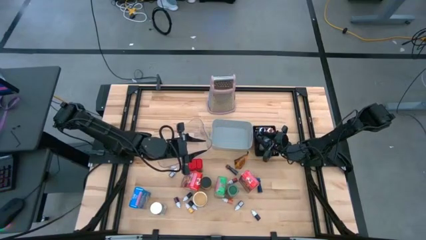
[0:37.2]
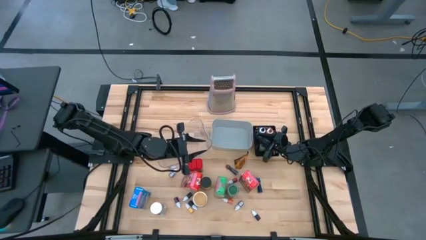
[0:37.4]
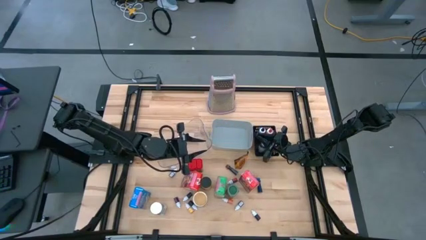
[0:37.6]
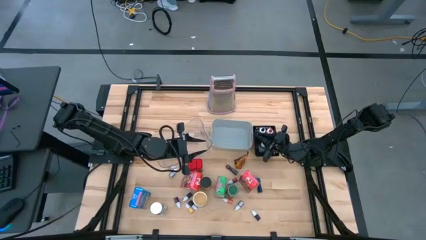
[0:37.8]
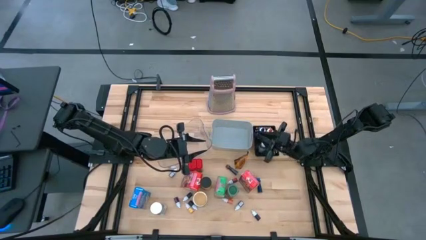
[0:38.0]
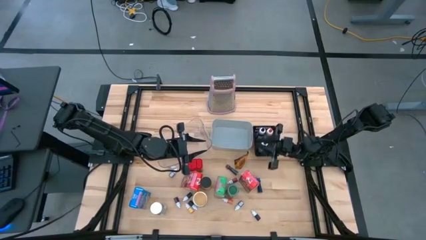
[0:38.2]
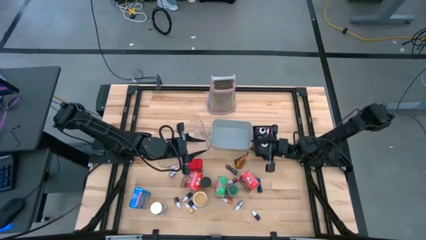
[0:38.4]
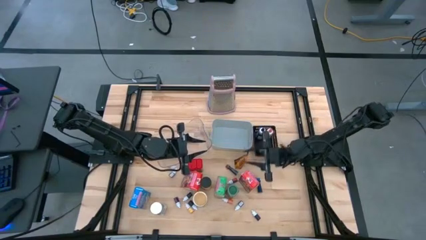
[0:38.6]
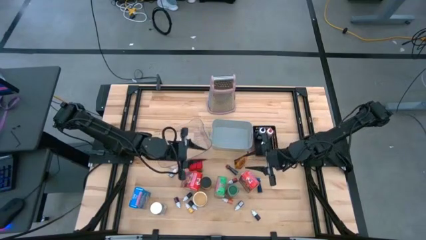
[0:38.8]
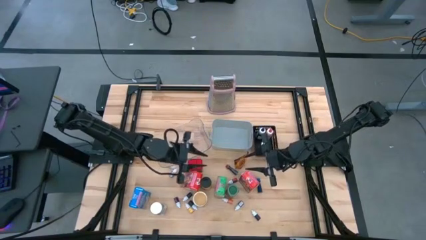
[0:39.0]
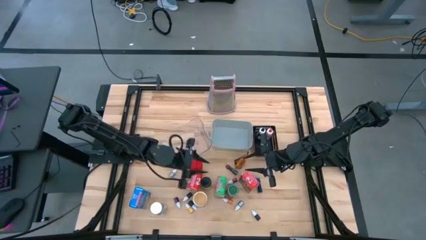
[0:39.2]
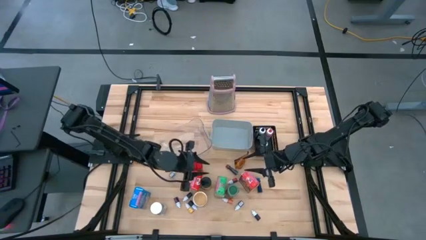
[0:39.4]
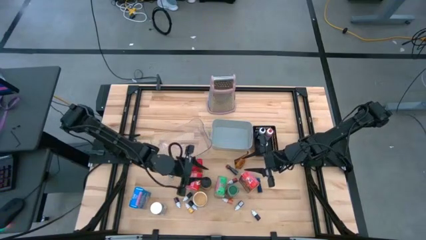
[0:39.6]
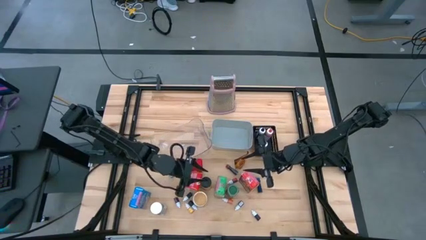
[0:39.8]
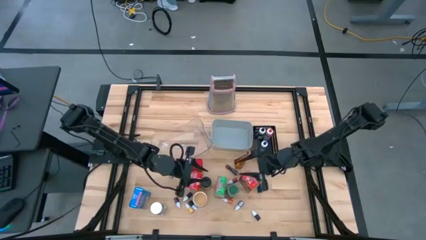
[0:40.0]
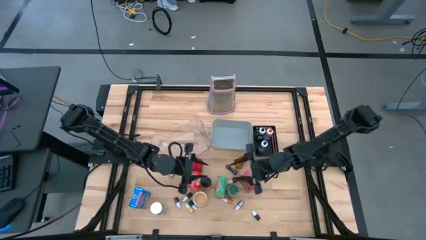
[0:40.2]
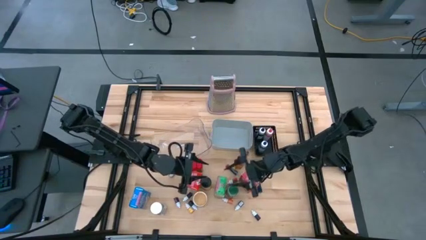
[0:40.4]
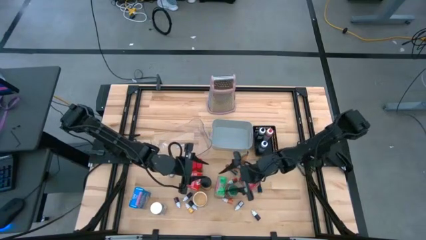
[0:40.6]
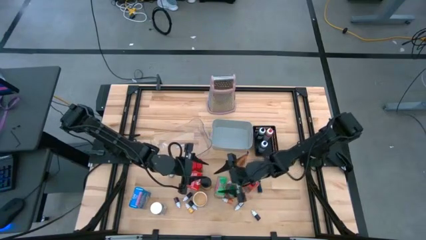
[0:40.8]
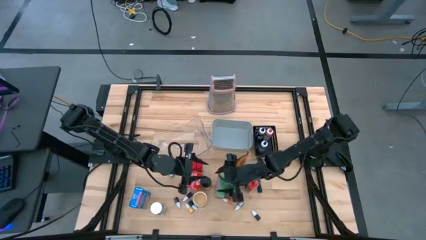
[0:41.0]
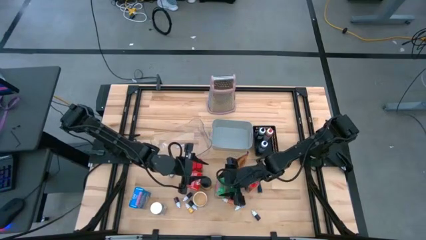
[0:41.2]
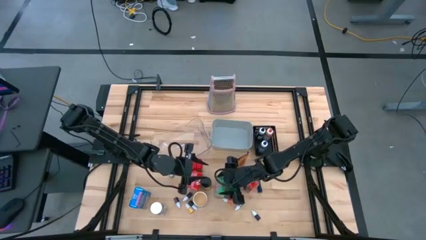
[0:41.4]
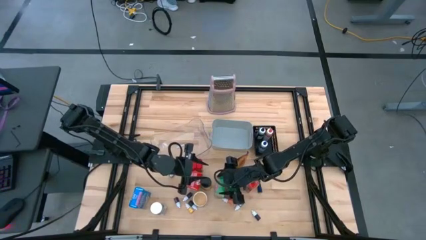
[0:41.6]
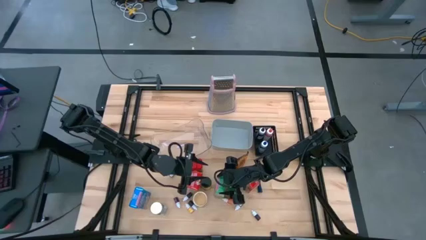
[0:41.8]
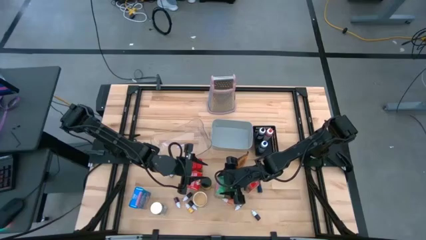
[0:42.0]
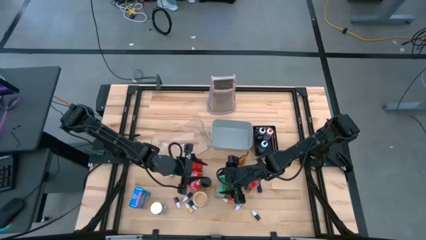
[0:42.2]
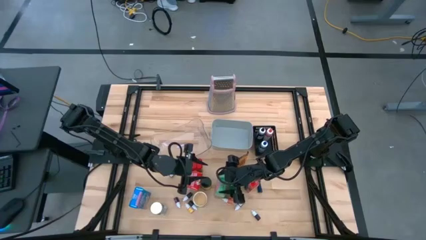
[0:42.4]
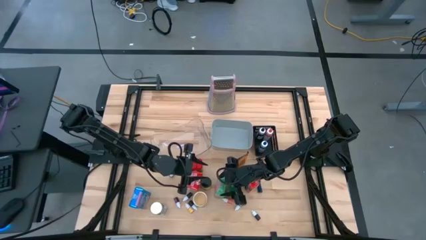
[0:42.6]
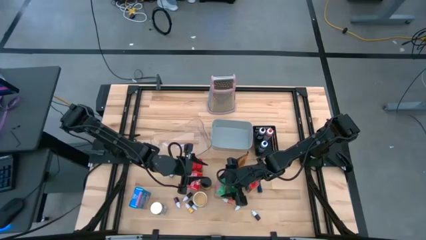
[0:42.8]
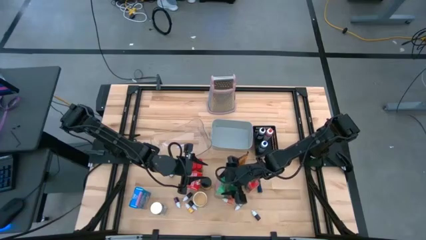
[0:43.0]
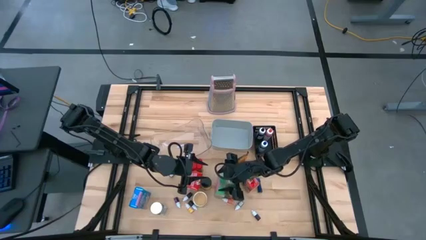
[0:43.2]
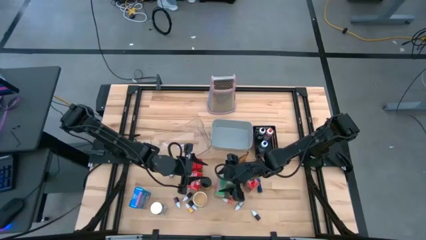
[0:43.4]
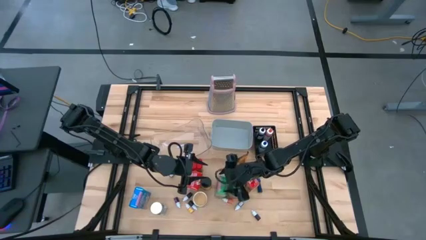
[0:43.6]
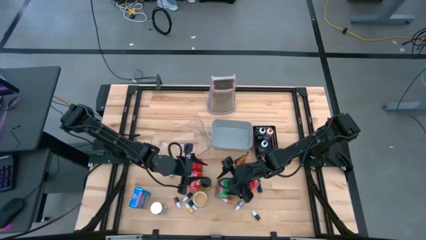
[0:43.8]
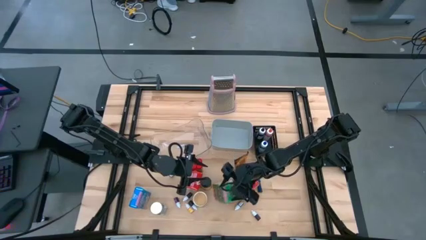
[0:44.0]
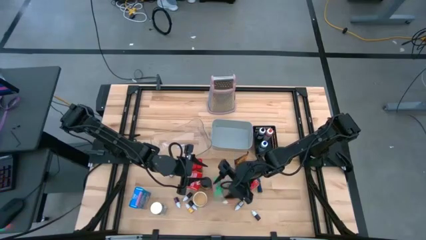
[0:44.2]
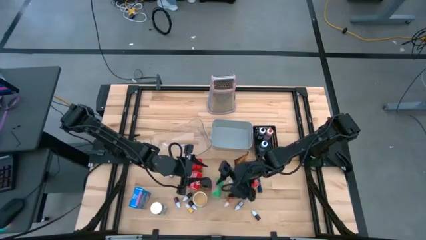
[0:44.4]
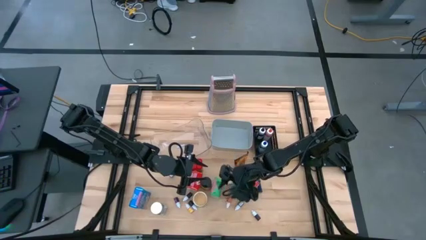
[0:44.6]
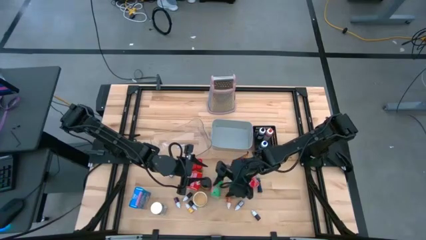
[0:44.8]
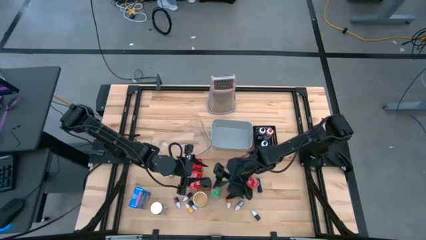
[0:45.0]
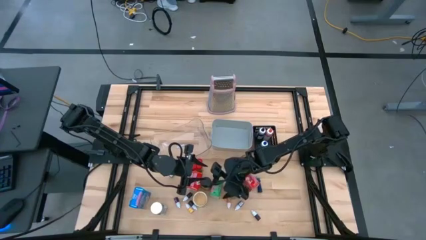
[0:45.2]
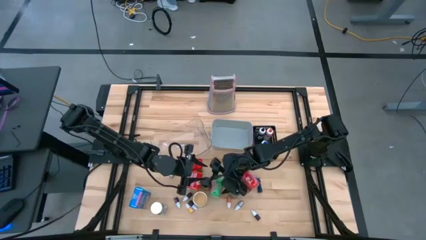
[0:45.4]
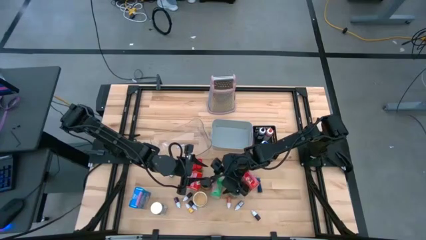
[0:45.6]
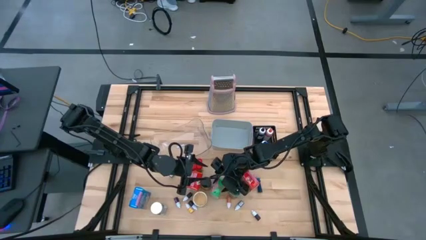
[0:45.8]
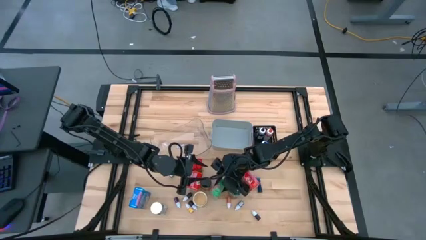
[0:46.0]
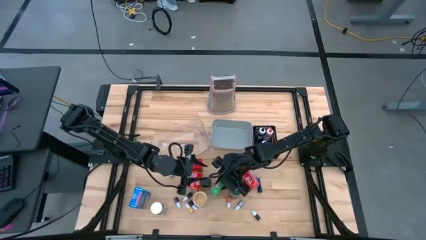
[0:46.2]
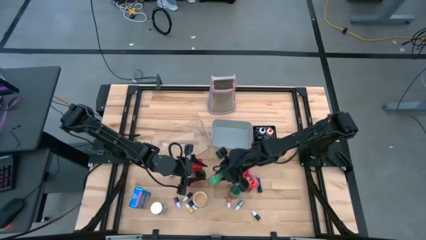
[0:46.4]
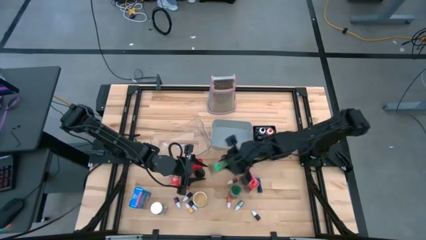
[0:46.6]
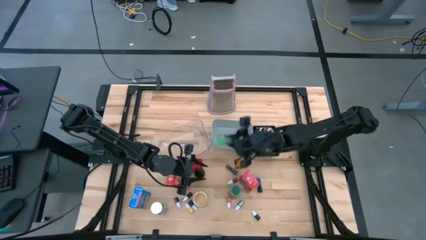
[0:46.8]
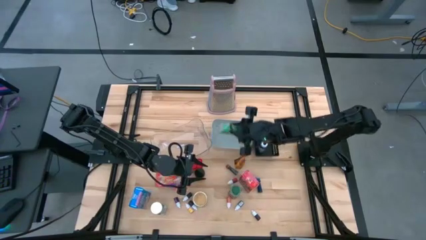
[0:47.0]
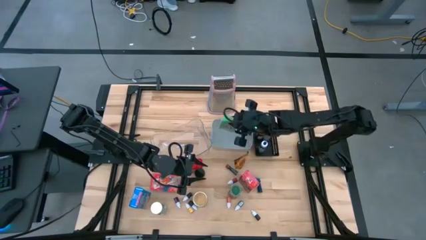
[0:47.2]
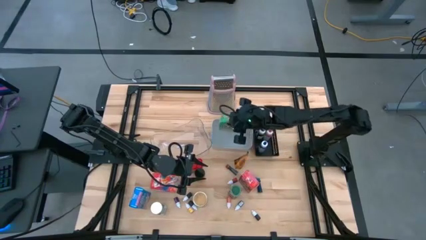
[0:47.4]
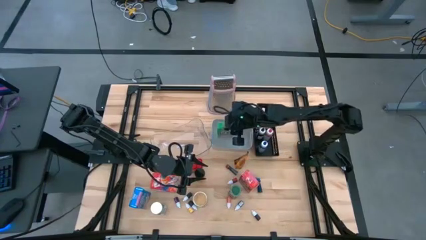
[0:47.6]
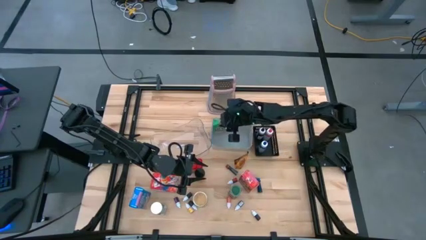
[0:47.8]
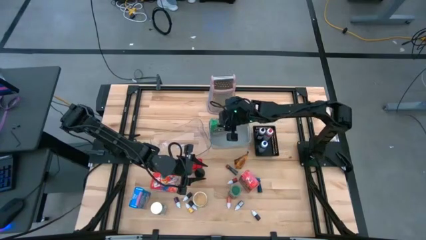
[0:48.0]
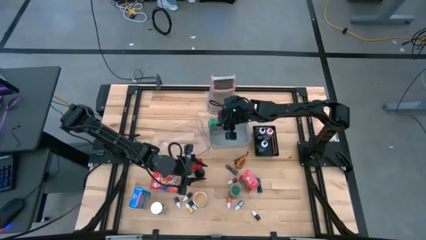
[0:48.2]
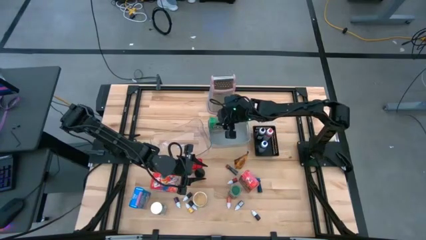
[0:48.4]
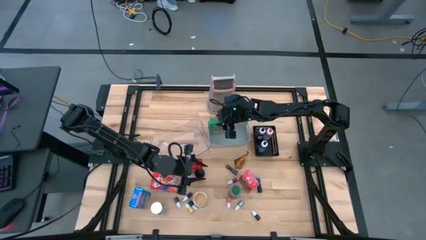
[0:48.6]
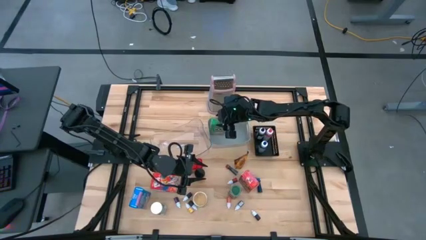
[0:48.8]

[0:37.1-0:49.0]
Task: Pick & Place Kitchen Items
Put the green cereal box into the gray bin

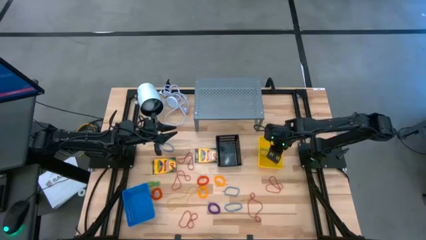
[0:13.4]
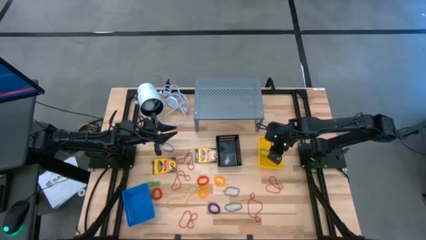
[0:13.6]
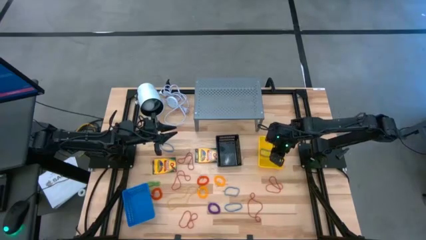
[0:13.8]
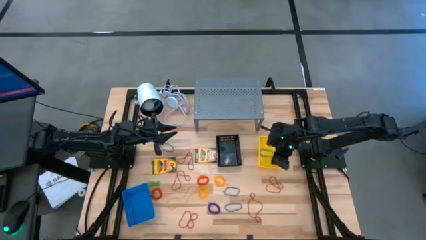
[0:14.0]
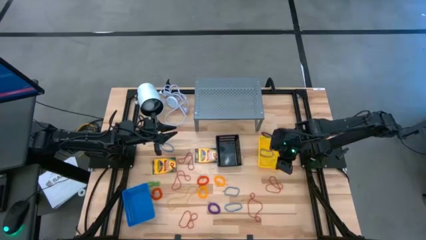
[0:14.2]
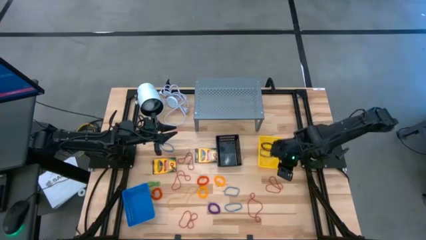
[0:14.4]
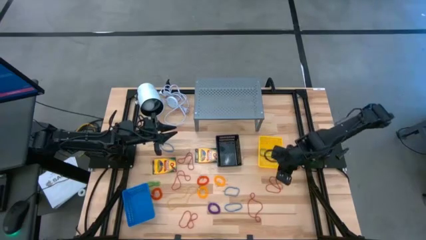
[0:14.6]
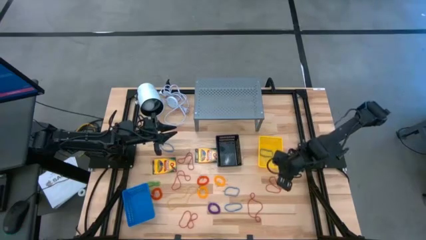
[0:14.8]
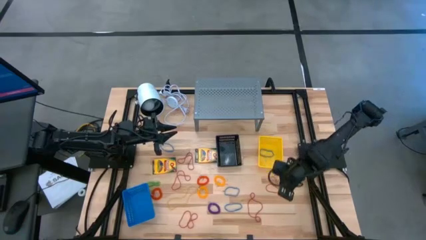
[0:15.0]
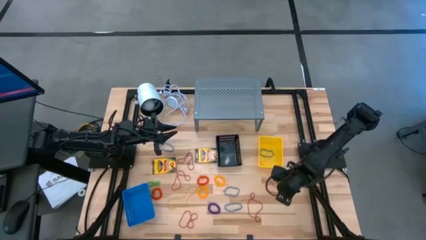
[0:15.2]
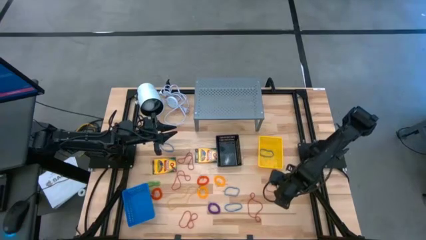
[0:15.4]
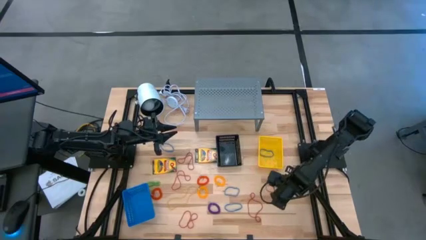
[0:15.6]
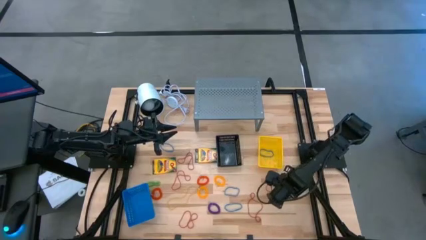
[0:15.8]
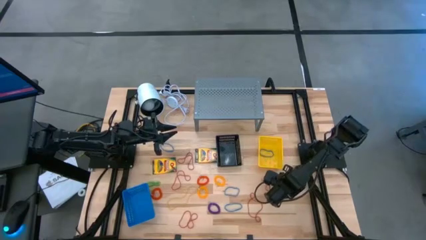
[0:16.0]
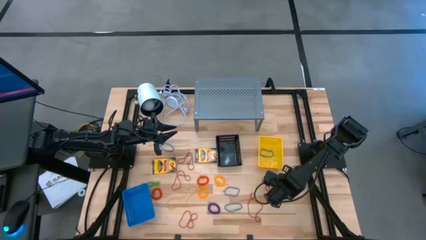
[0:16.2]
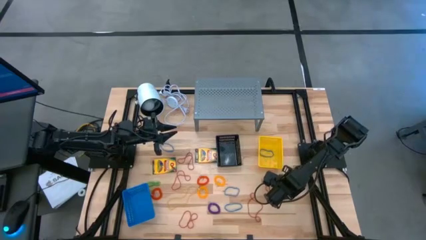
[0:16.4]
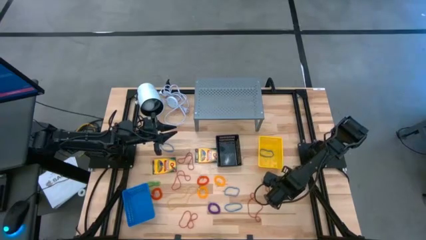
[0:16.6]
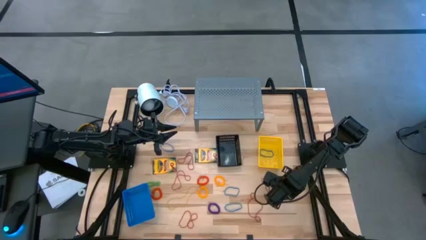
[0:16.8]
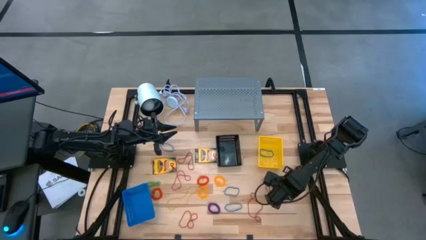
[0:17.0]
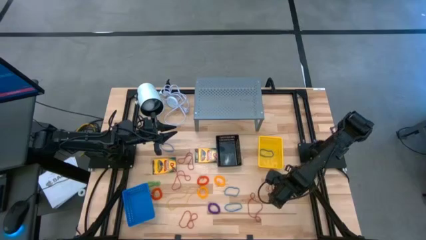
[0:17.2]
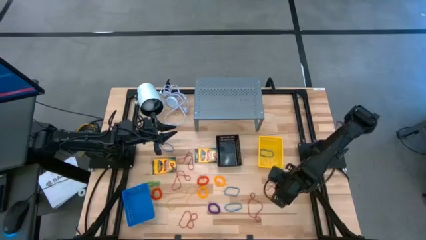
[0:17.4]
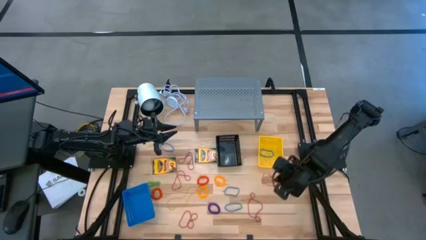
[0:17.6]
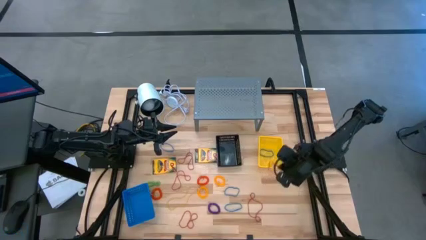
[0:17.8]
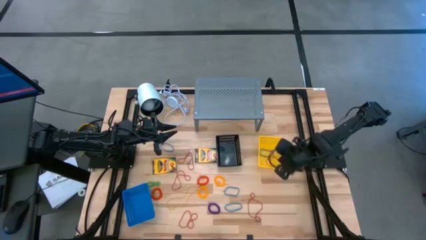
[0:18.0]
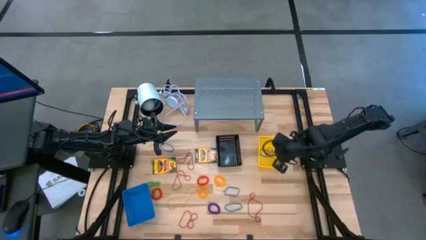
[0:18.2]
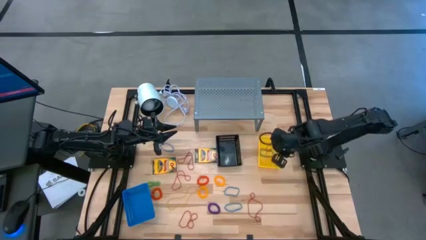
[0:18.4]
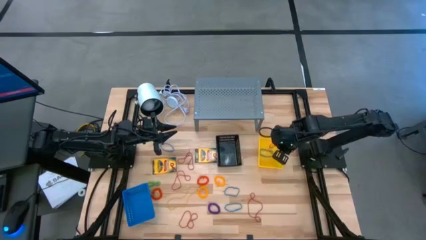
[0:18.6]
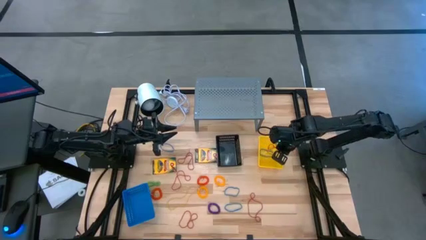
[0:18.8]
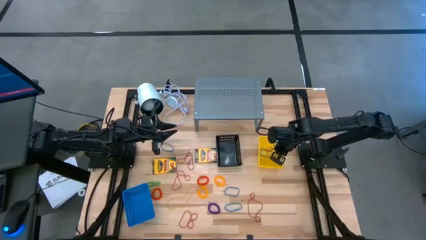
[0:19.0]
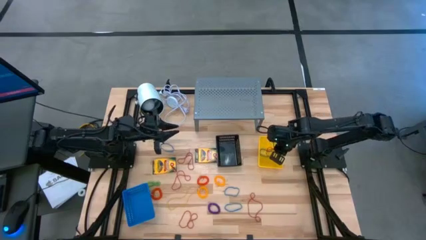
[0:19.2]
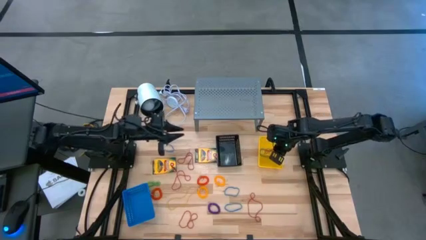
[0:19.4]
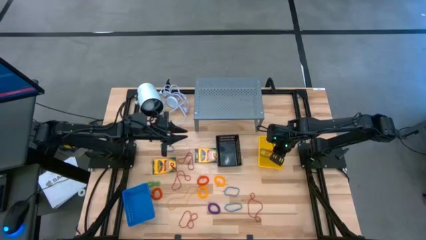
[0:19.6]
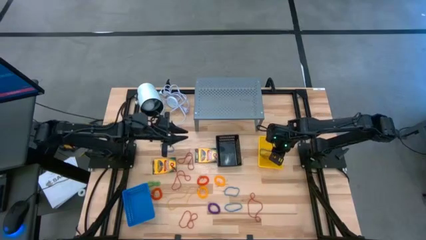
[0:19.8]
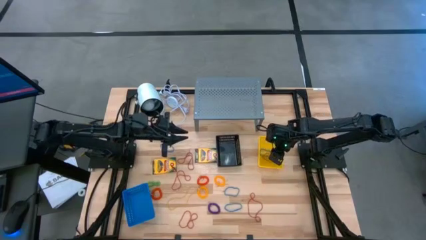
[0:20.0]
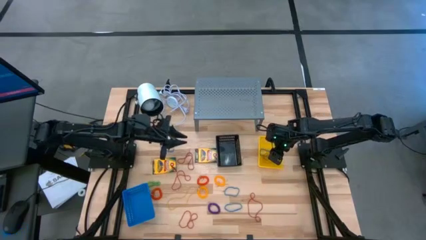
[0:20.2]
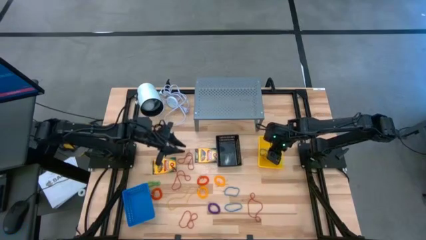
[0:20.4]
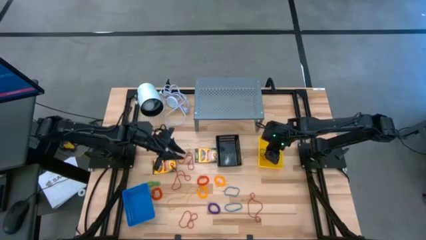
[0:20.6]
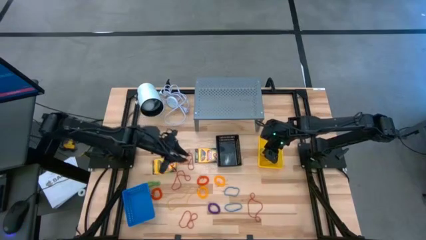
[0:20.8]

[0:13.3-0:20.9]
Task: Pick & Place Office Desk Supplies
Put the red rubber band into the yellow basket
